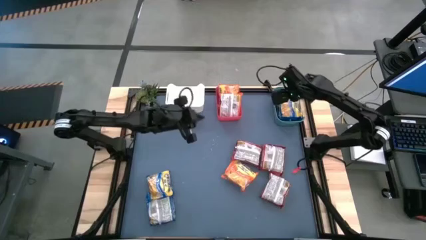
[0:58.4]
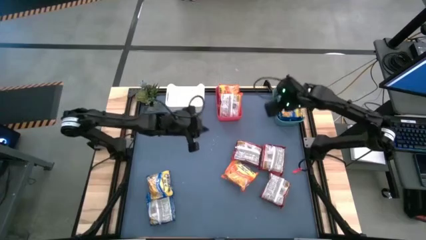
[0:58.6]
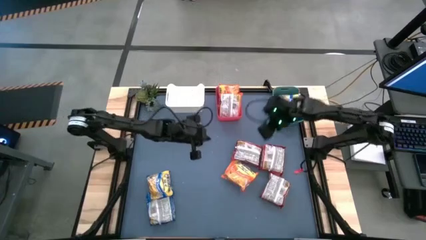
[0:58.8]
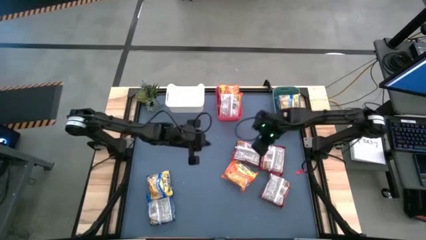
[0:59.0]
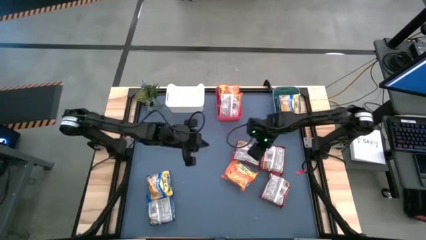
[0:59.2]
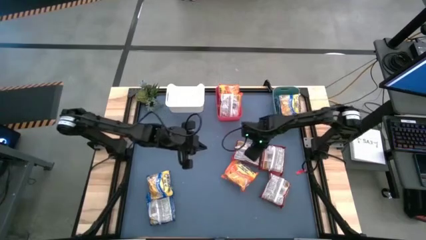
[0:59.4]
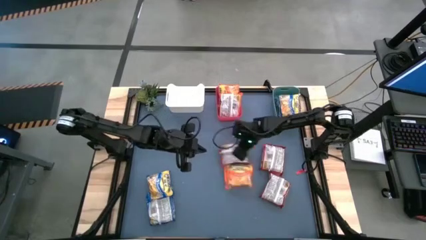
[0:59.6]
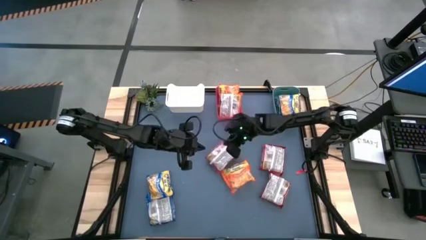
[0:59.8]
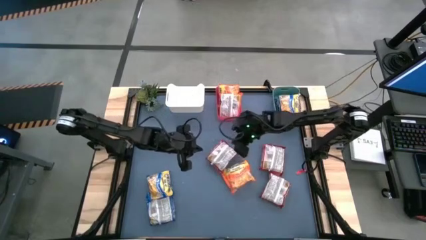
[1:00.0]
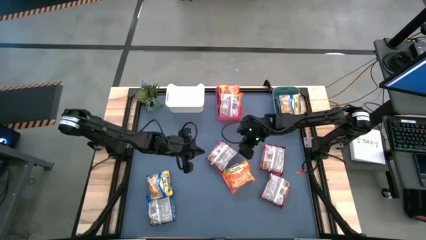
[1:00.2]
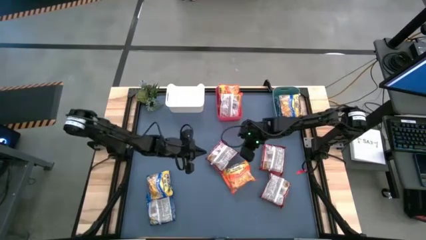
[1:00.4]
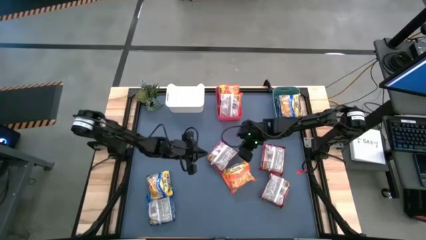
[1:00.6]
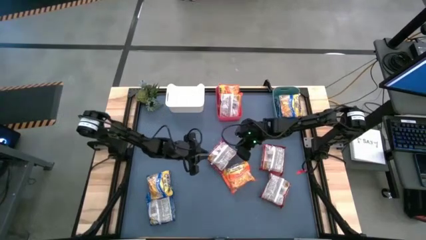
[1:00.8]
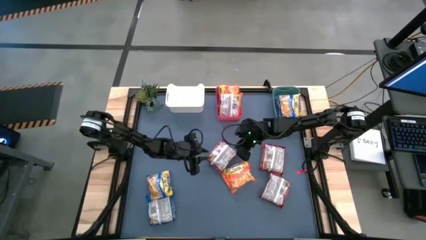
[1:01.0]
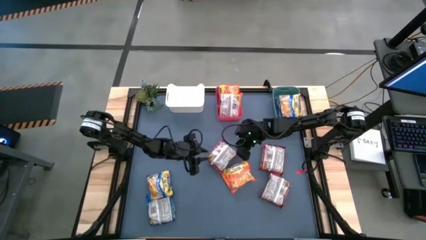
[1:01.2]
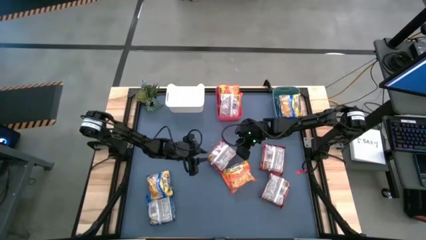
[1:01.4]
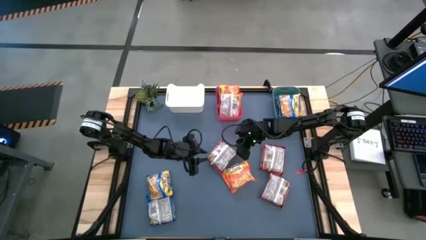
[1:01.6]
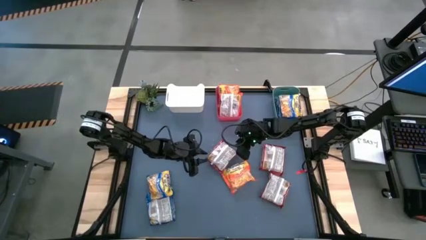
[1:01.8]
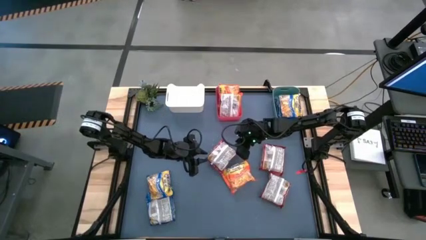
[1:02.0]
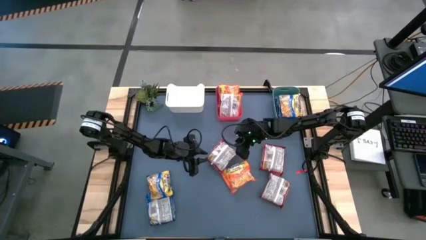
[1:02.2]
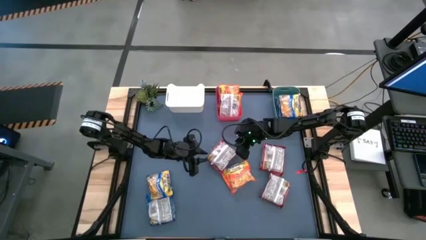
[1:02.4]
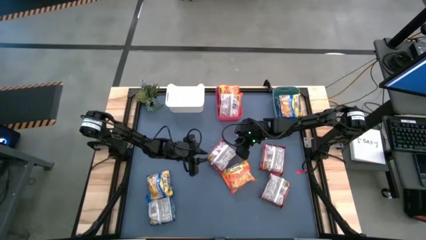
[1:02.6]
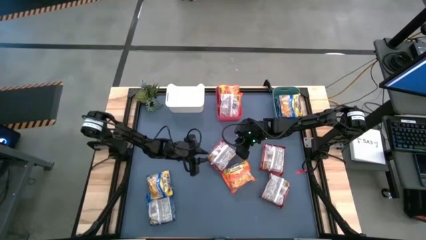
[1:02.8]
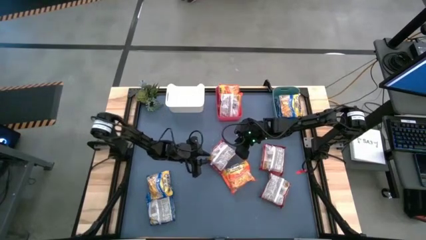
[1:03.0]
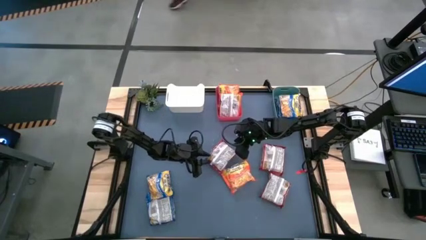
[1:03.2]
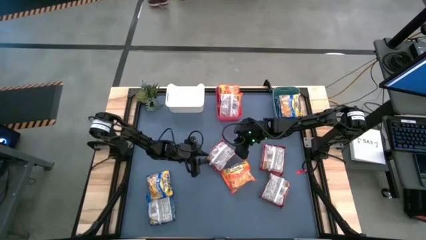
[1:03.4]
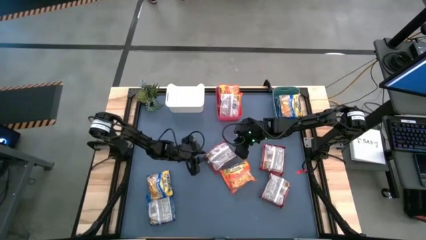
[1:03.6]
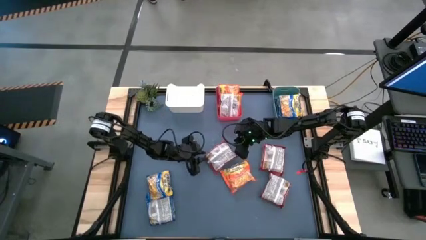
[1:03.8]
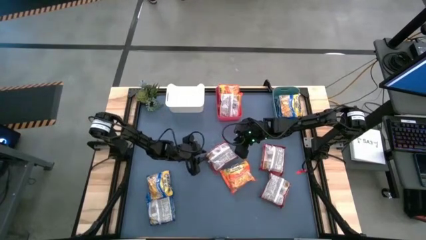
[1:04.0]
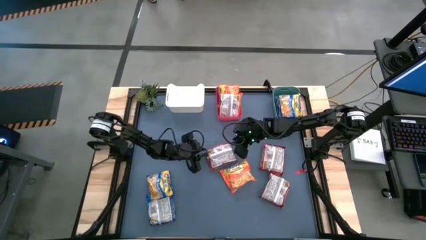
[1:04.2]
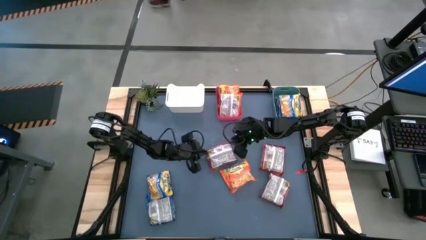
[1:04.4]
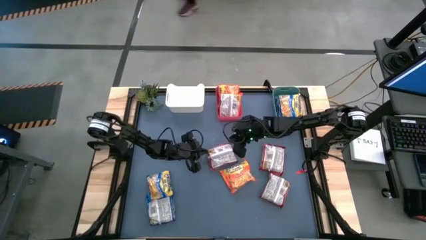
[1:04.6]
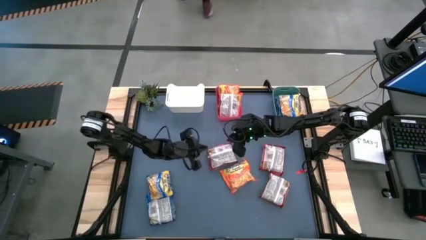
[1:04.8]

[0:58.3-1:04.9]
Task: Sort Maruchan noodles
Put the top left red noodle pack into the white bin

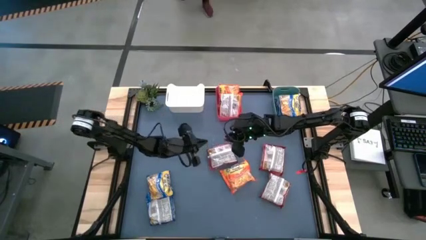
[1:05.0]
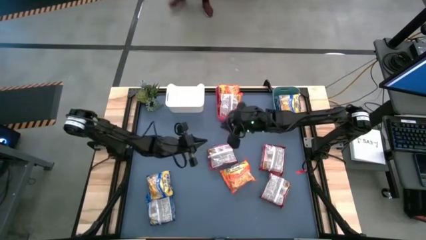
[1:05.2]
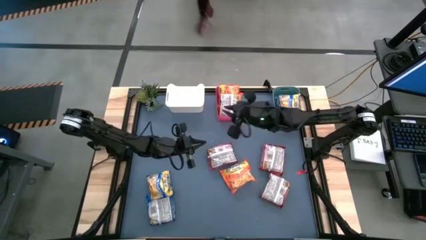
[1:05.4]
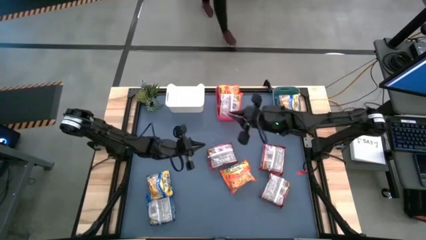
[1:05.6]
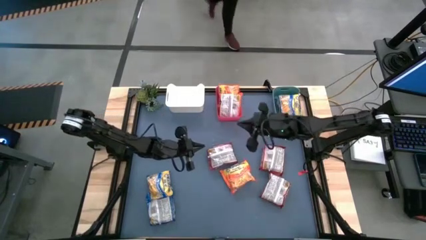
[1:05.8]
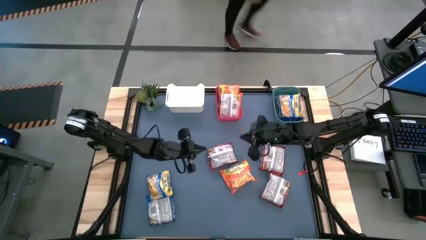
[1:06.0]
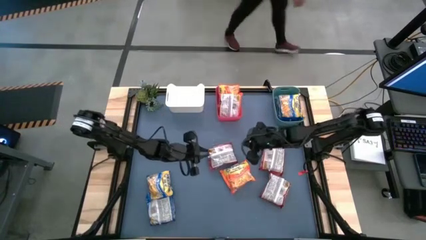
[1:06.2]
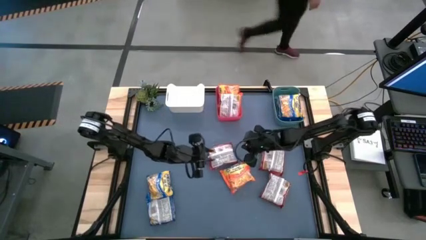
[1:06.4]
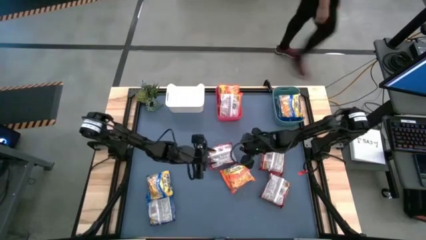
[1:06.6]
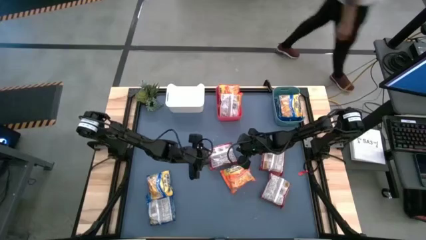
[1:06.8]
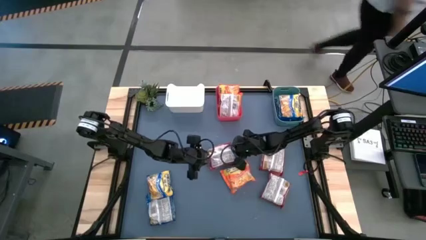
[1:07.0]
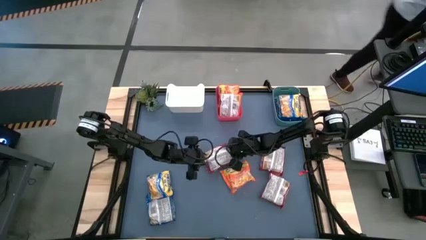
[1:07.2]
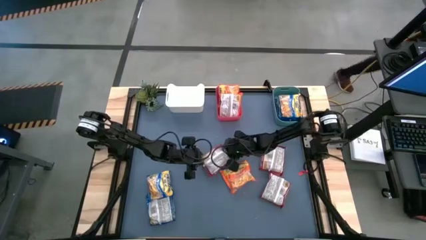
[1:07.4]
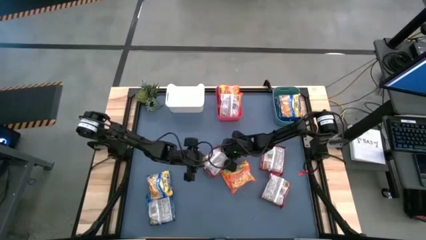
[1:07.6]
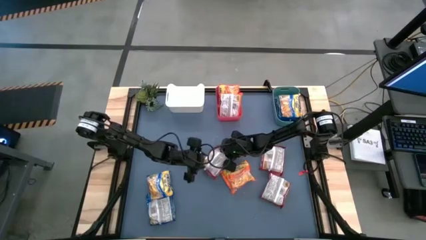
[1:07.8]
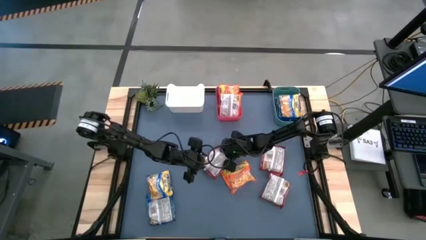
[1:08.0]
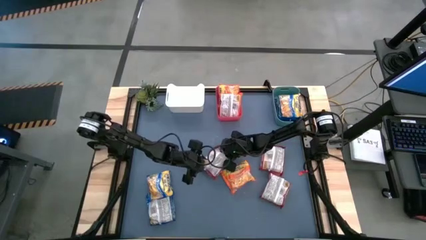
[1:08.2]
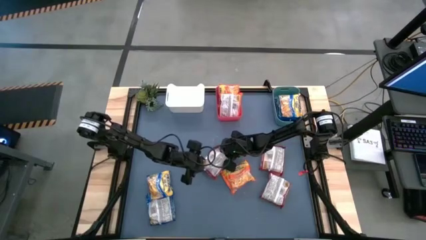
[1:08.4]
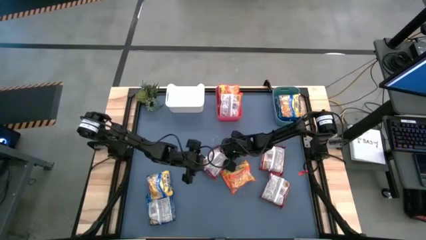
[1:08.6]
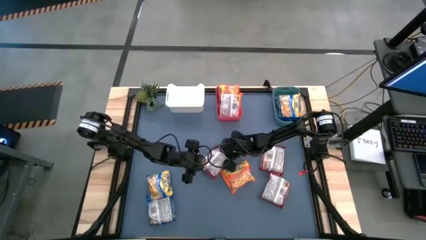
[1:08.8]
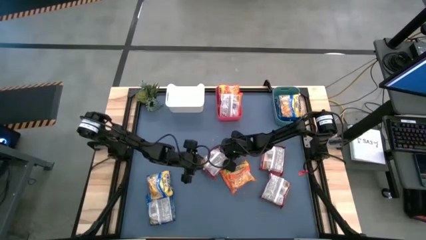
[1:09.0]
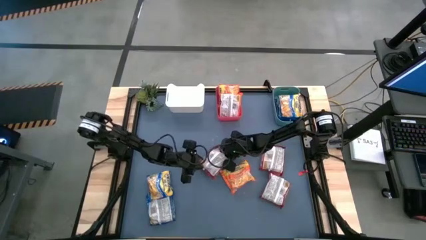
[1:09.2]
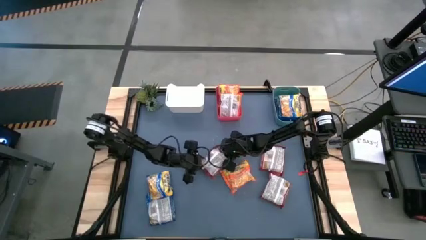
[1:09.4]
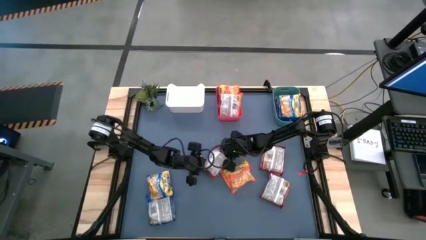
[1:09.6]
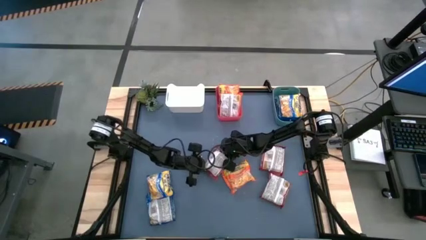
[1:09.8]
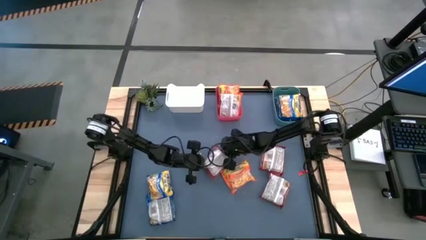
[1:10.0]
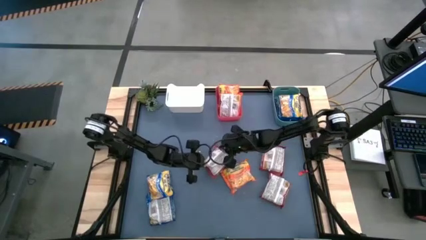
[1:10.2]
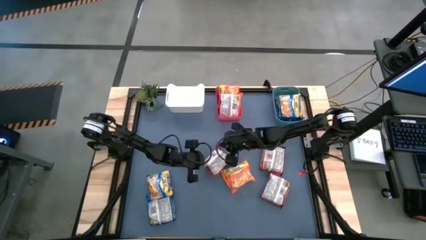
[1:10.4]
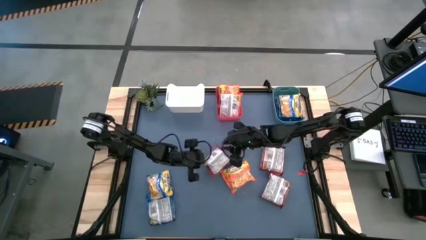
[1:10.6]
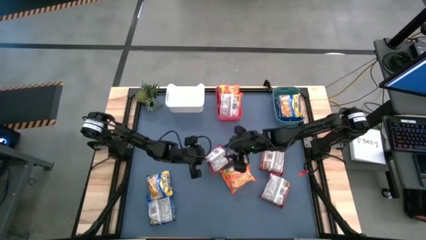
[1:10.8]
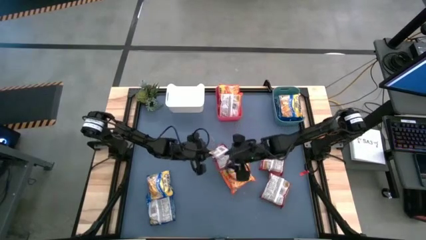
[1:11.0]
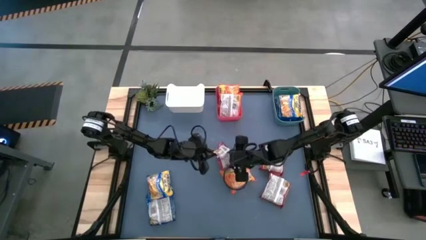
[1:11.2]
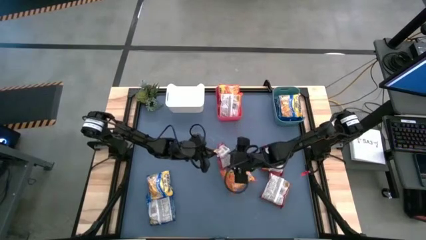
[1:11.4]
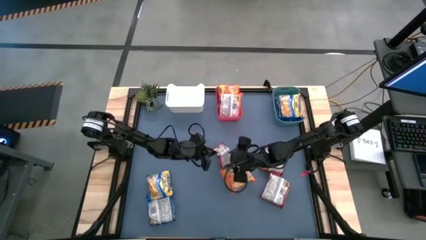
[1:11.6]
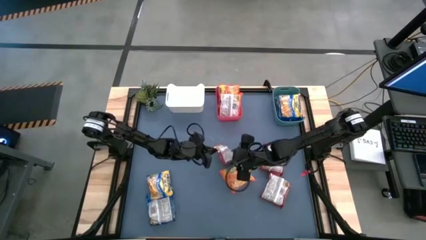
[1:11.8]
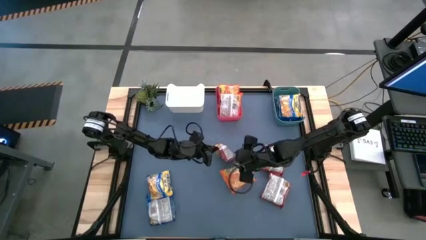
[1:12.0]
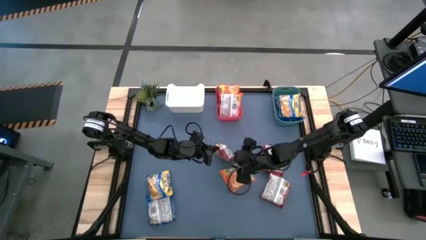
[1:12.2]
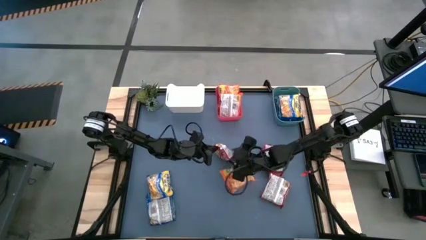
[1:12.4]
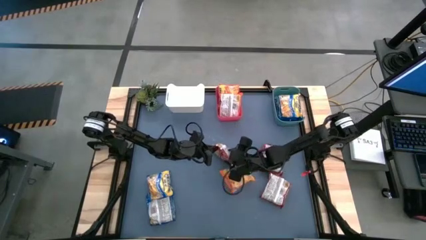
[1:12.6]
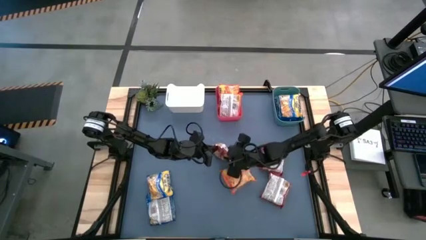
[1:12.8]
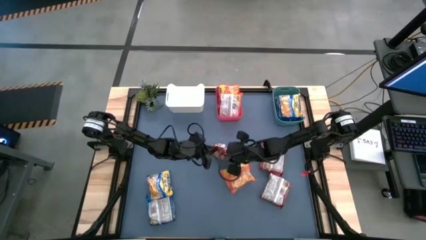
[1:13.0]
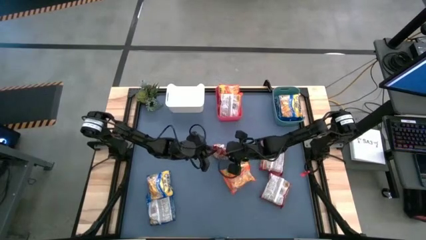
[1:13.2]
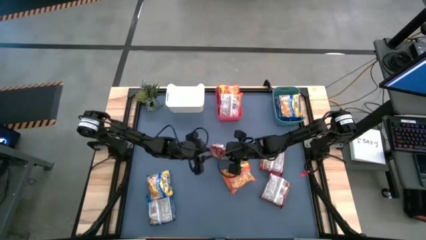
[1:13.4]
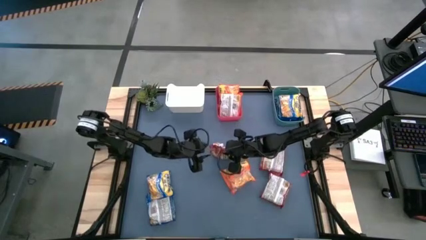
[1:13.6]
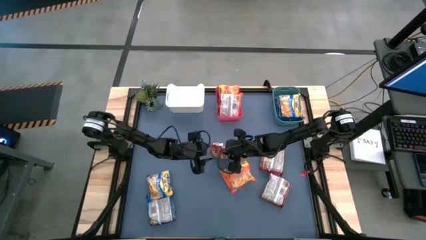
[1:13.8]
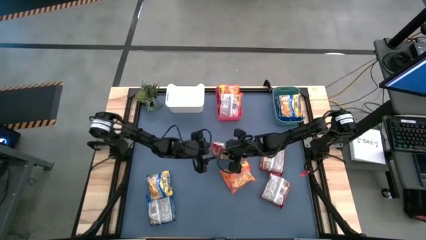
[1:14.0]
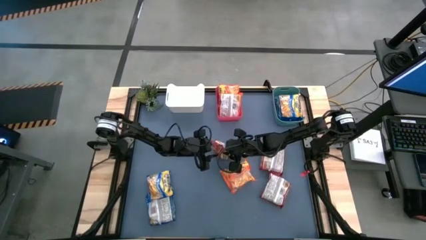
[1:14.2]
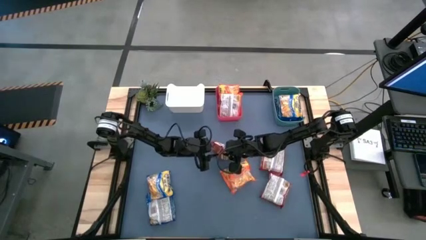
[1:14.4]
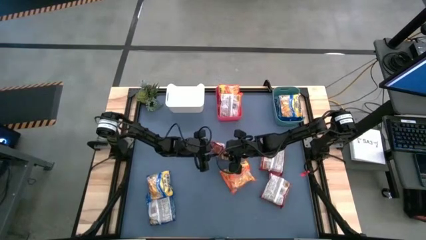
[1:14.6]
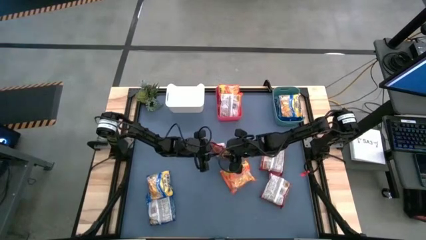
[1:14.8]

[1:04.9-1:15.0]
Put the top left red noodle pack into the white bin
